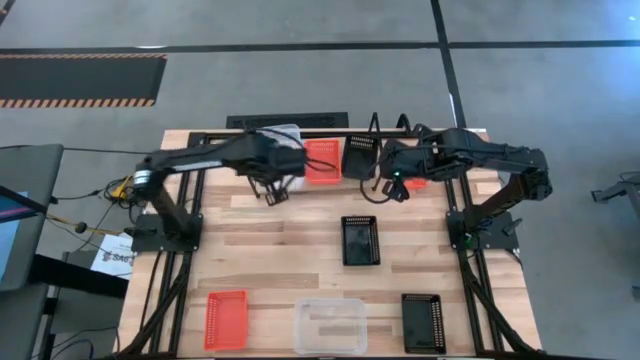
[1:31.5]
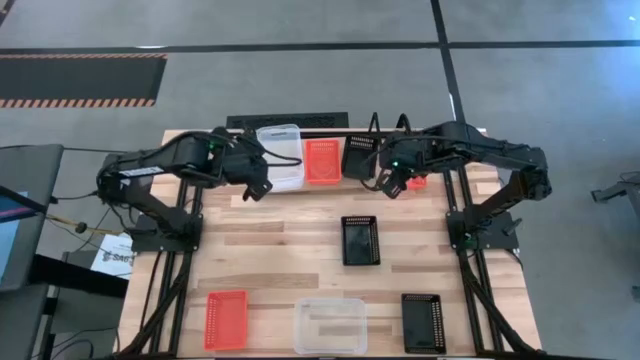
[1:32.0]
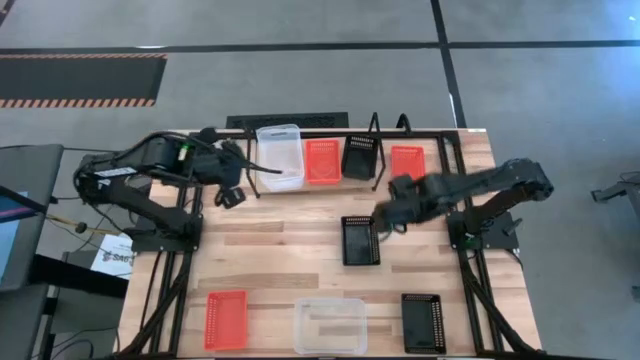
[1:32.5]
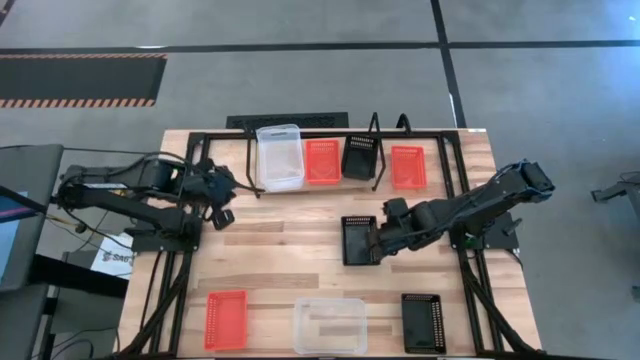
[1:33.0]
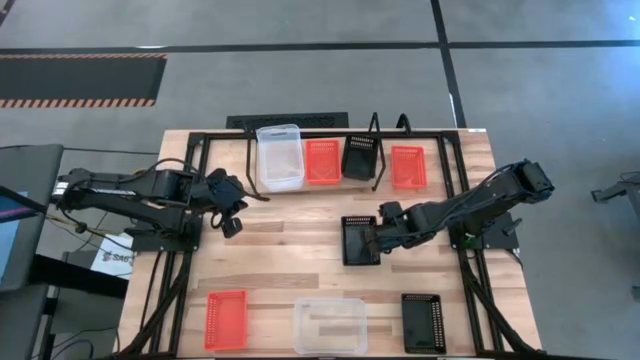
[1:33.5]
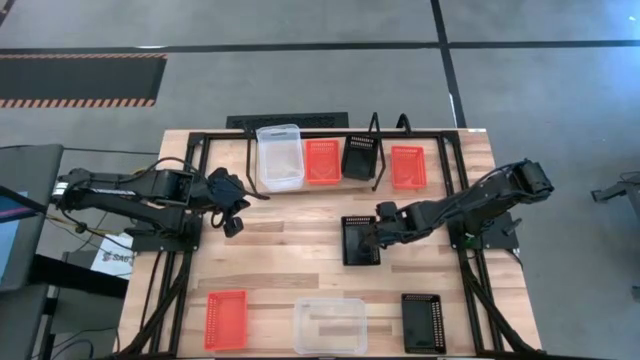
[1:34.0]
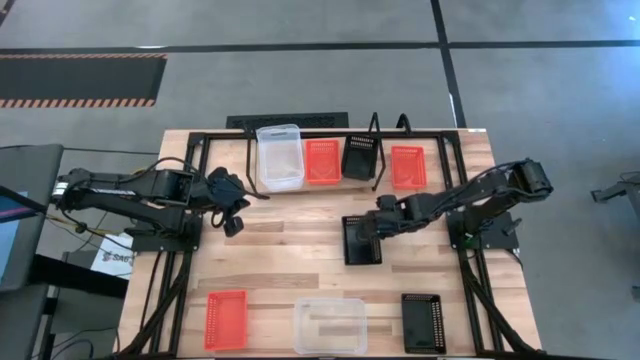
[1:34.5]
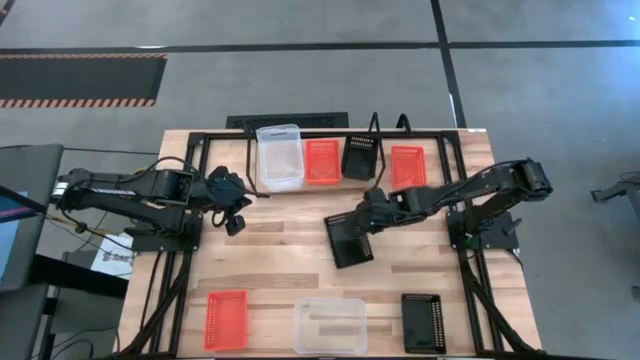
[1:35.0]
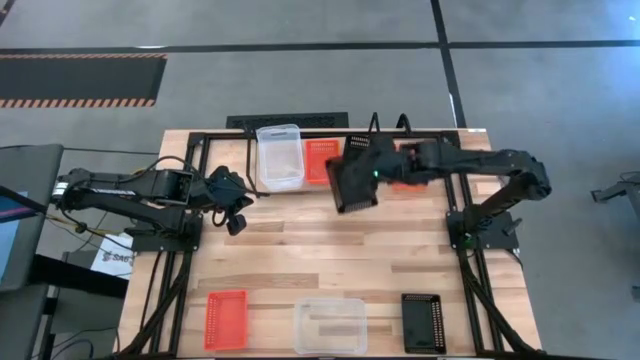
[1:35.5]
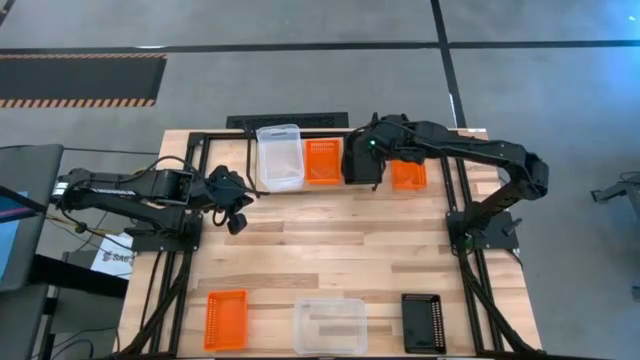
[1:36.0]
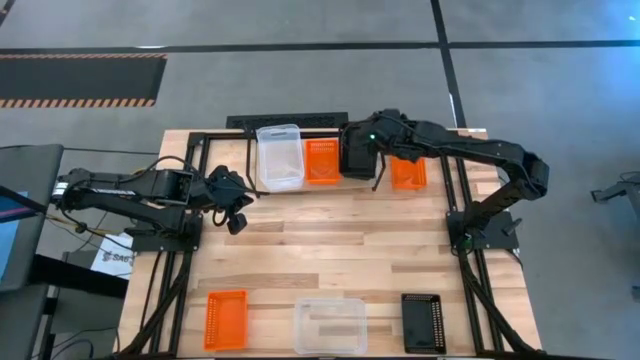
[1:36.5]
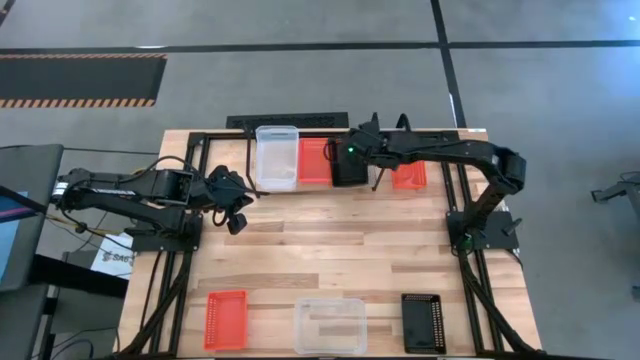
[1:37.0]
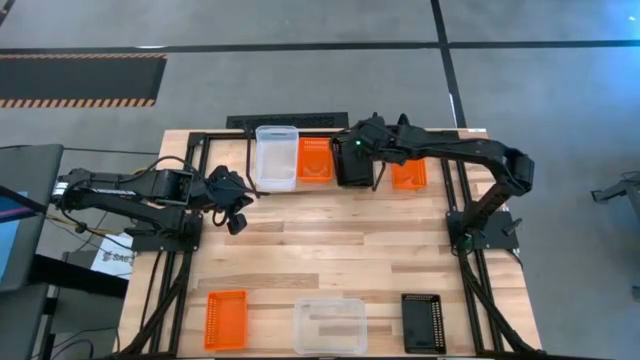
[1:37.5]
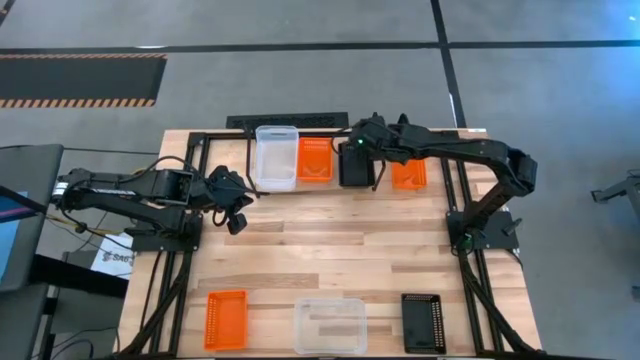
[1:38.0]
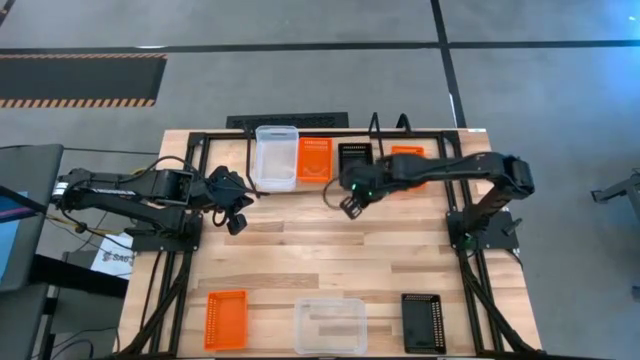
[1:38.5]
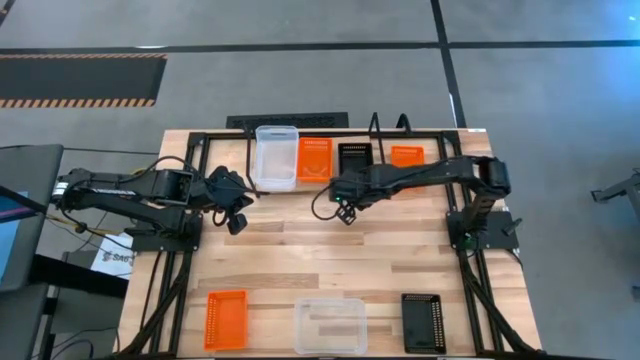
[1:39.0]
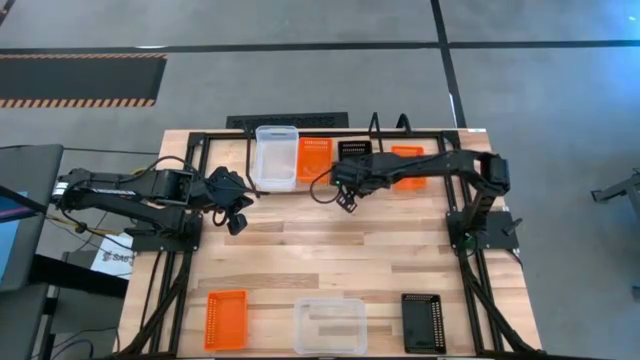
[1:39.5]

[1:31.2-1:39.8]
Task: Stack baskets on shelf by color
Stack the top black bin on top of the black bin on the shelf

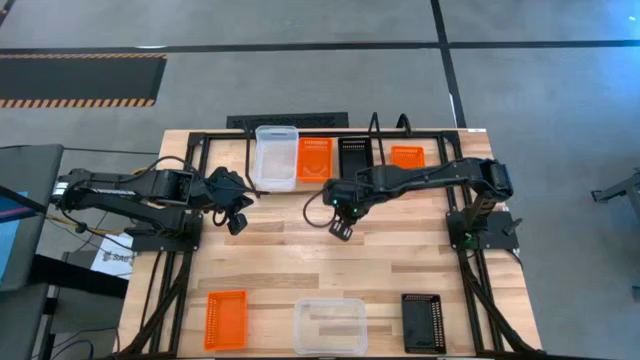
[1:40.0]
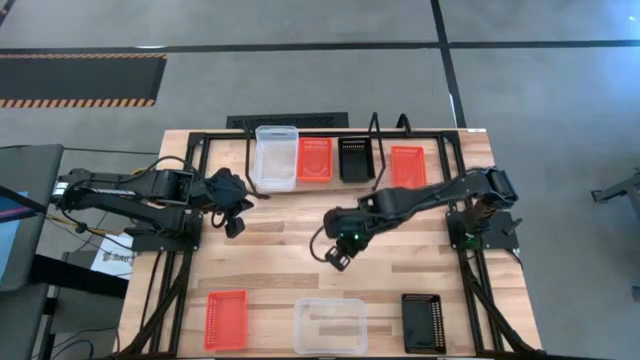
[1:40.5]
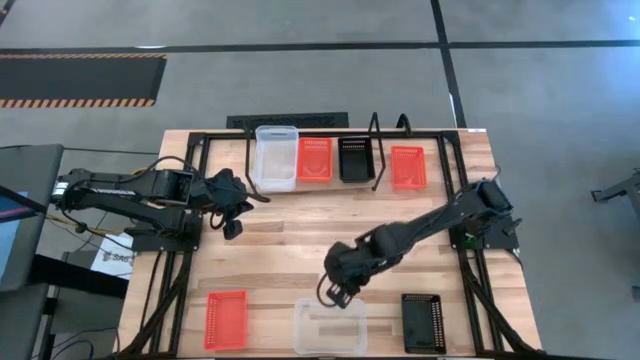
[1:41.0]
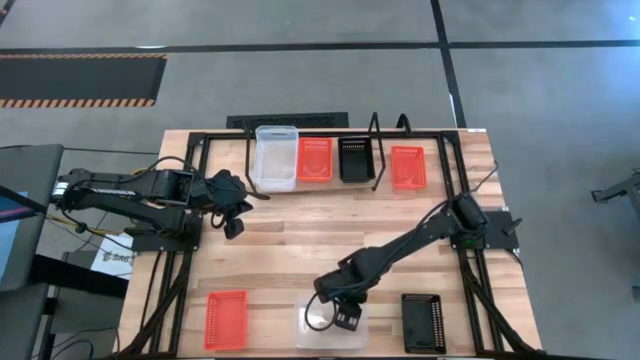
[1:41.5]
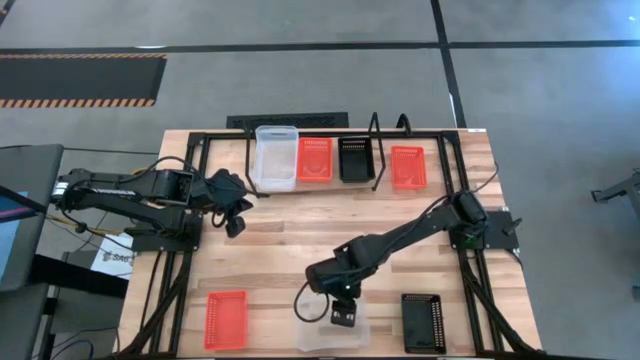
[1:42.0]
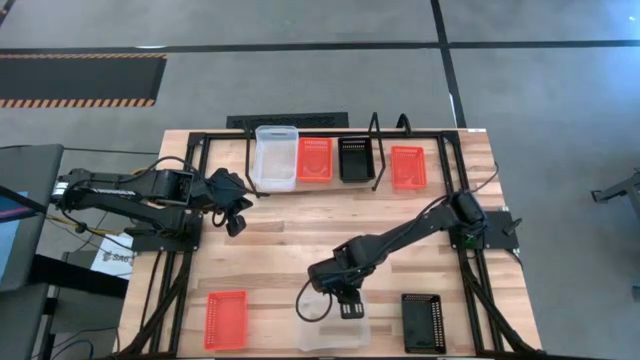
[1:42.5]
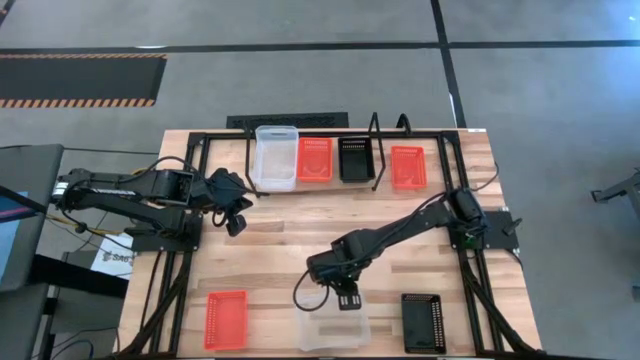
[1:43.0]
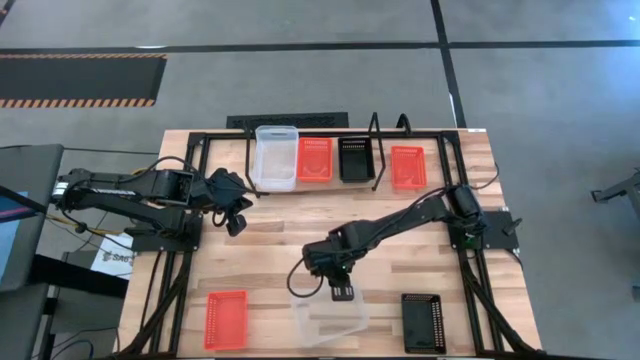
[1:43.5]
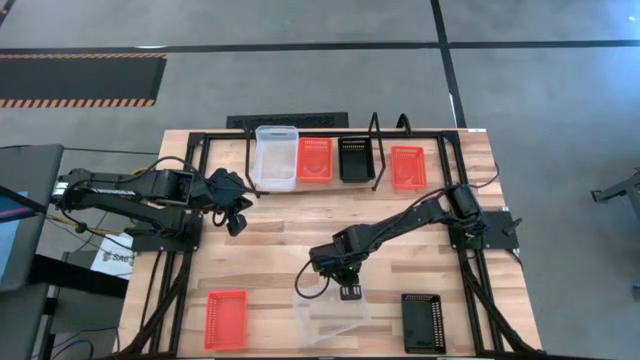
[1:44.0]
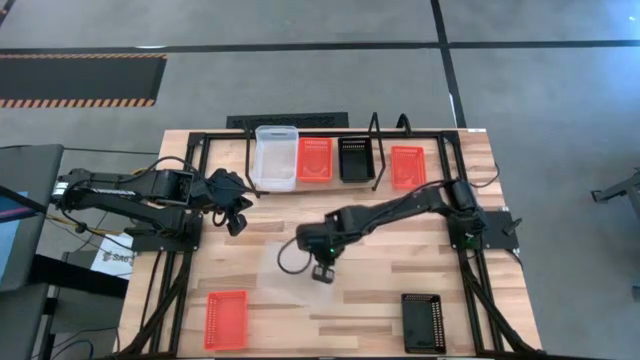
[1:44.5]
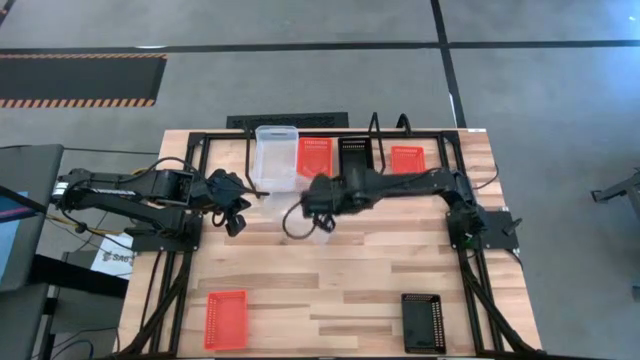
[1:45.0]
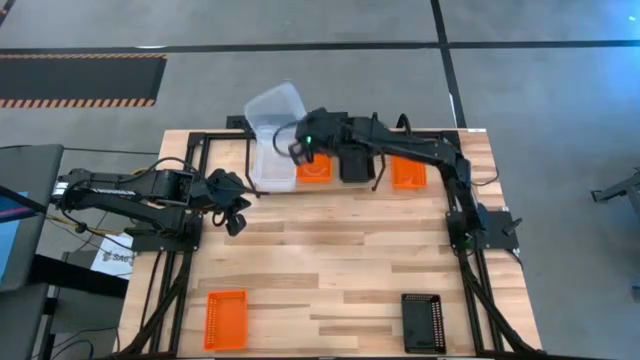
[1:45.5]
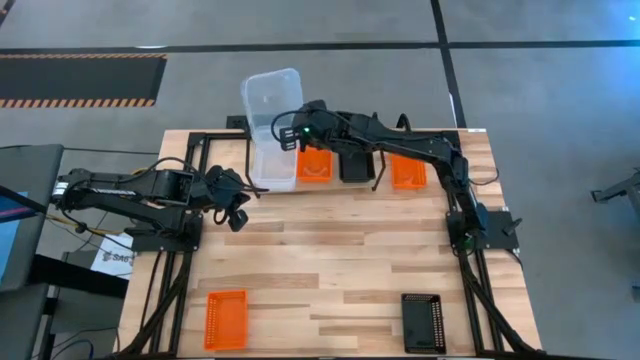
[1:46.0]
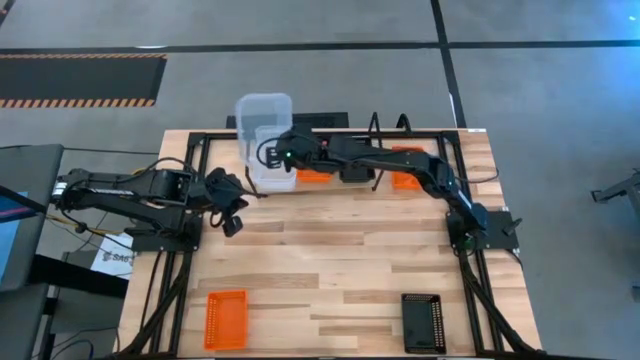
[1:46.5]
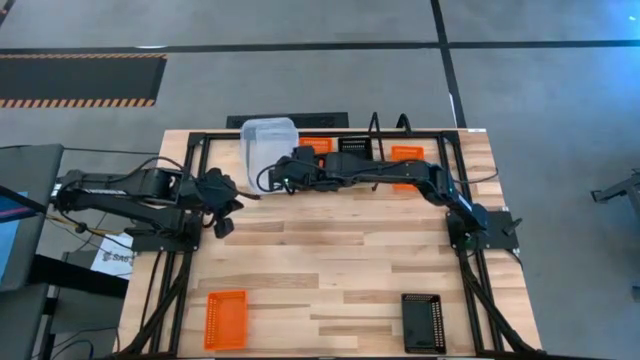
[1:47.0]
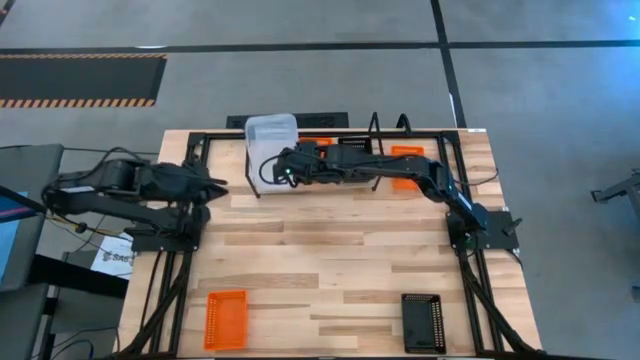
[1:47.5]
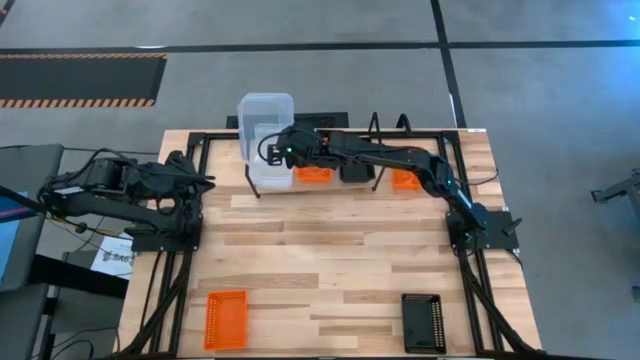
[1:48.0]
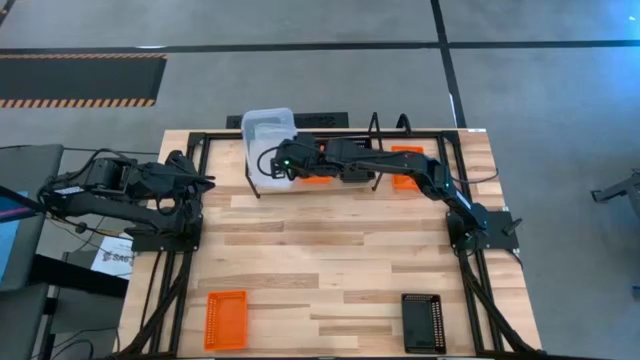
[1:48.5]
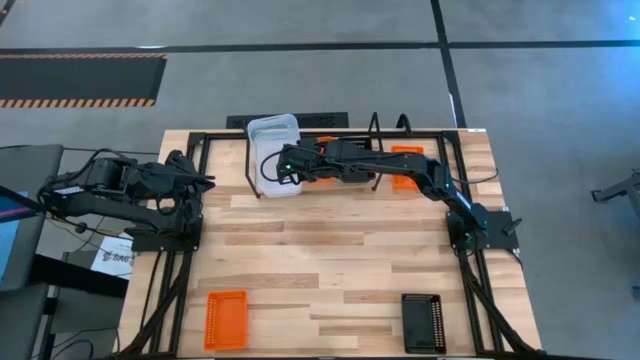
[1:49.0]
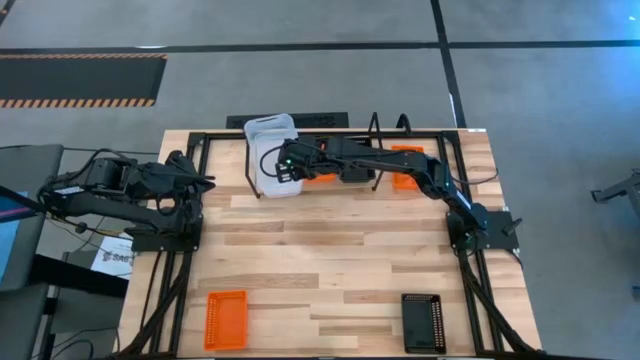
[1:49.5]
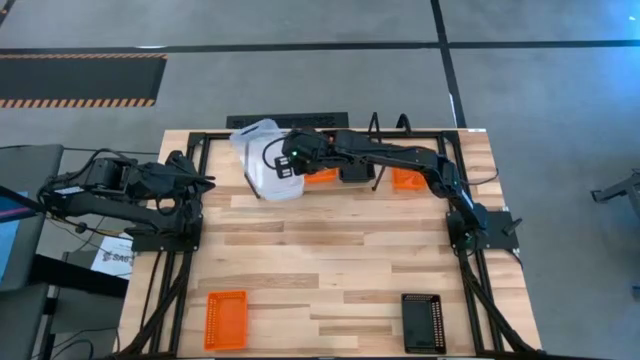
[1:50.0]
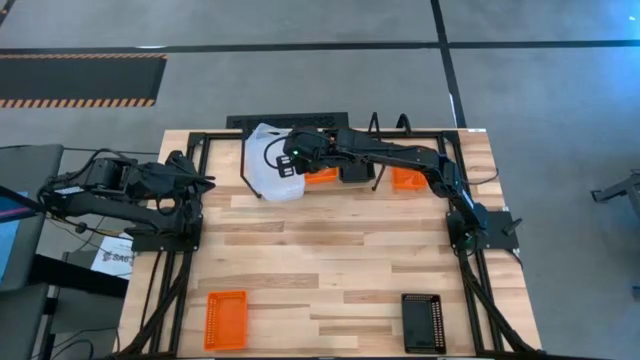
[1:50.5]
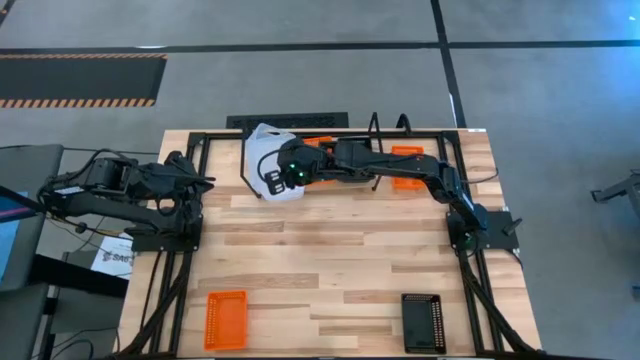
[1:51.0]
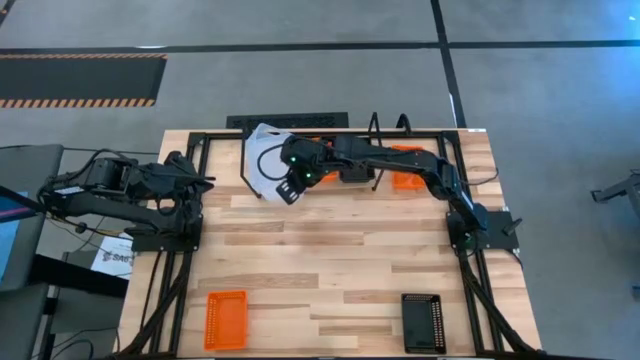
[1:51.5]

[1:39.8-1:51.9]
Stack the transparent bin on top of the transparent bin on the shelf
